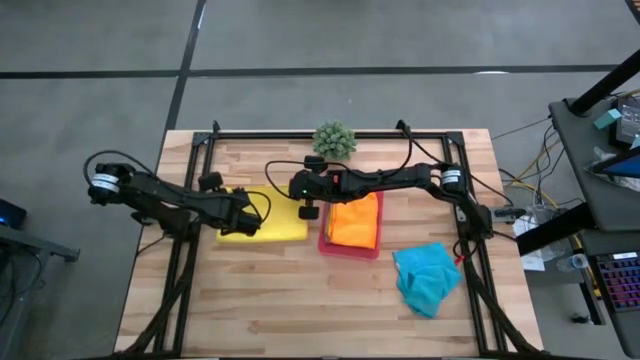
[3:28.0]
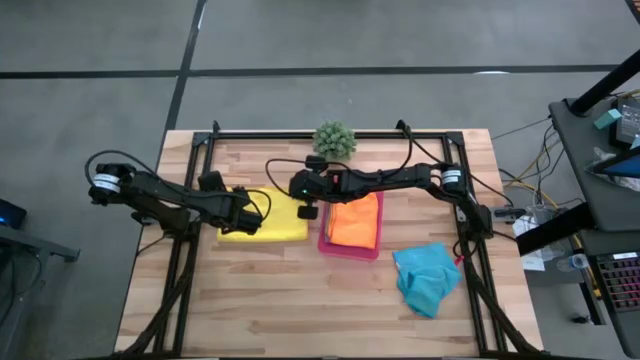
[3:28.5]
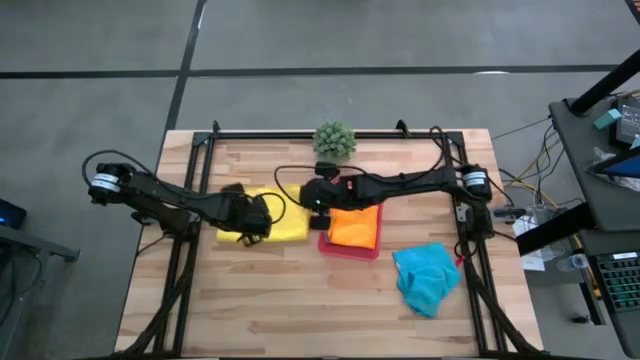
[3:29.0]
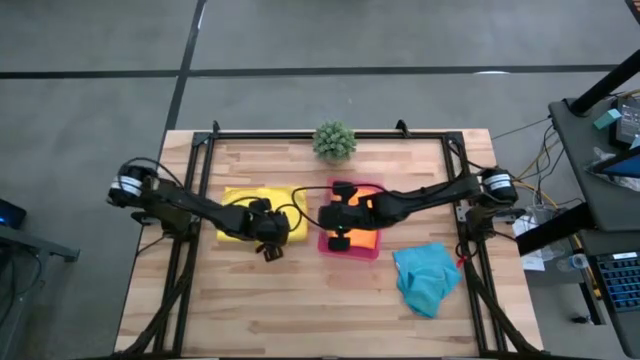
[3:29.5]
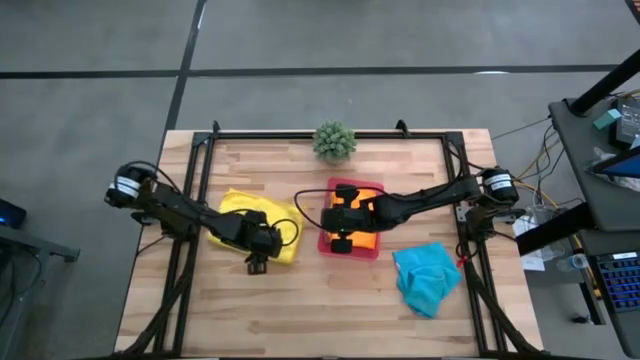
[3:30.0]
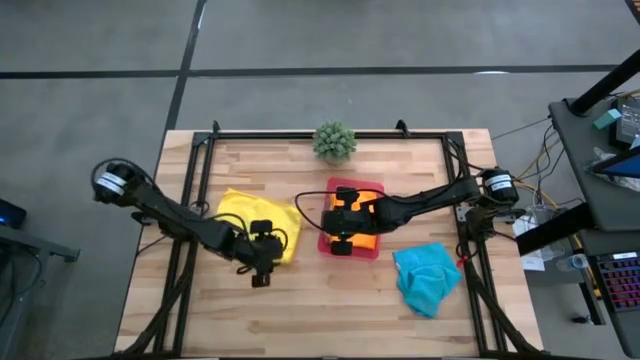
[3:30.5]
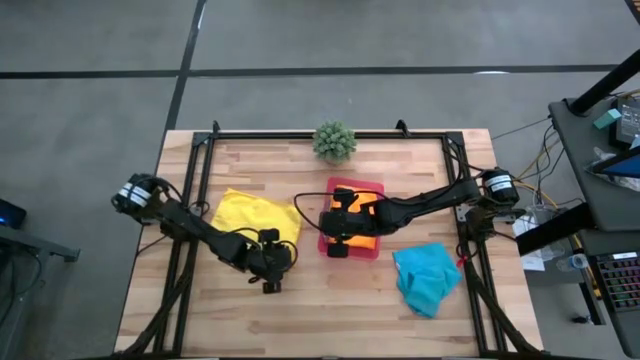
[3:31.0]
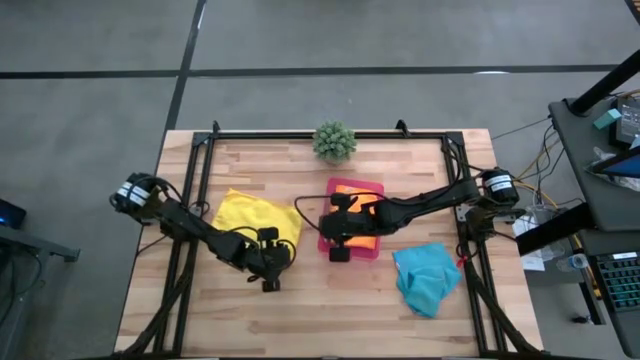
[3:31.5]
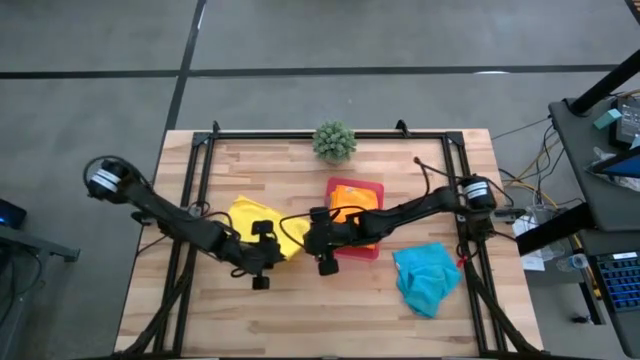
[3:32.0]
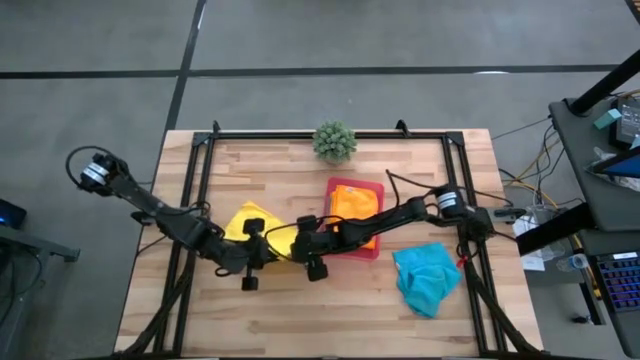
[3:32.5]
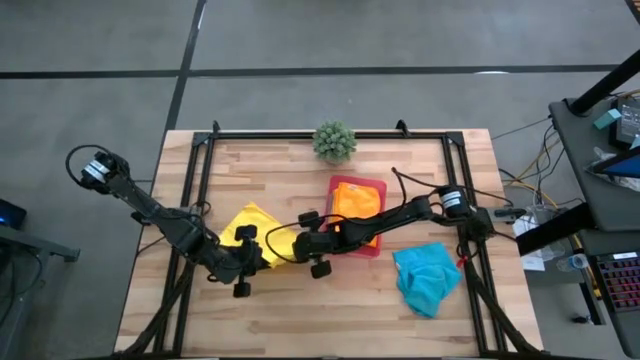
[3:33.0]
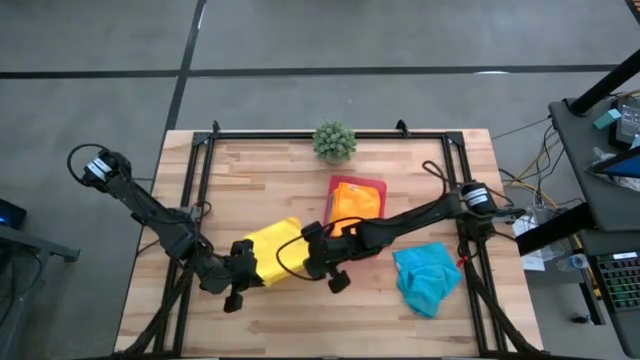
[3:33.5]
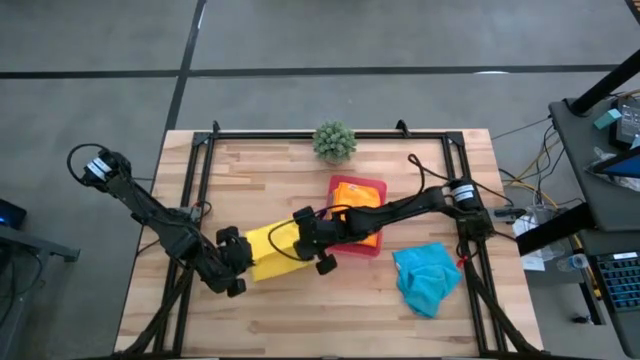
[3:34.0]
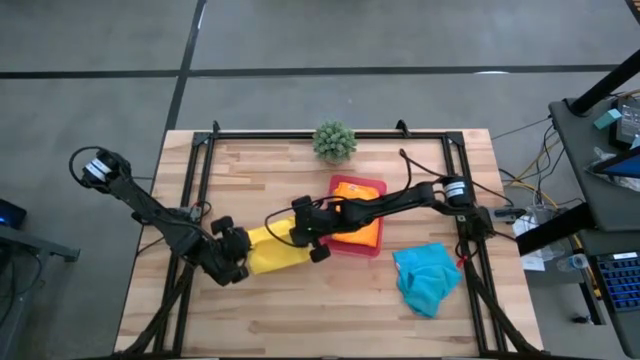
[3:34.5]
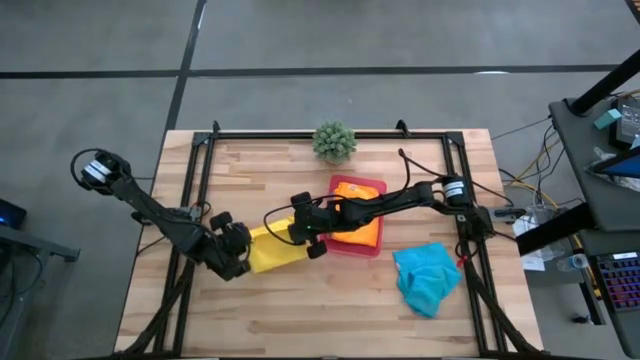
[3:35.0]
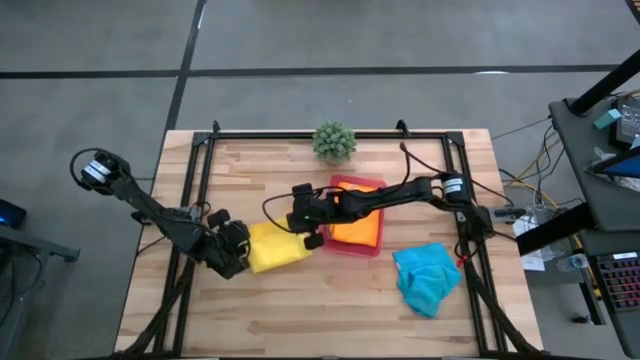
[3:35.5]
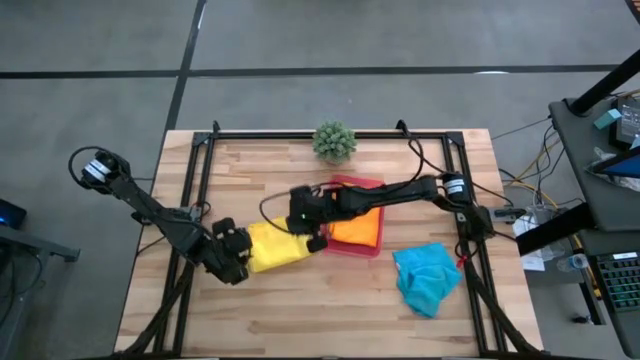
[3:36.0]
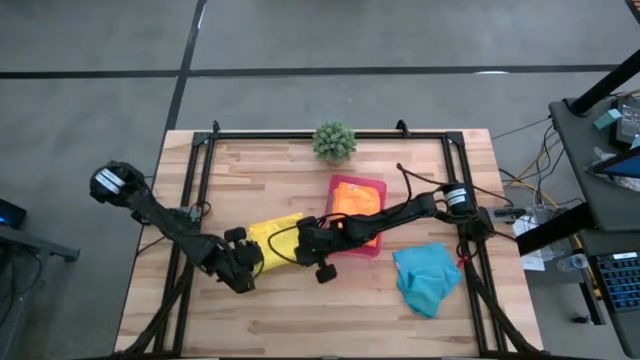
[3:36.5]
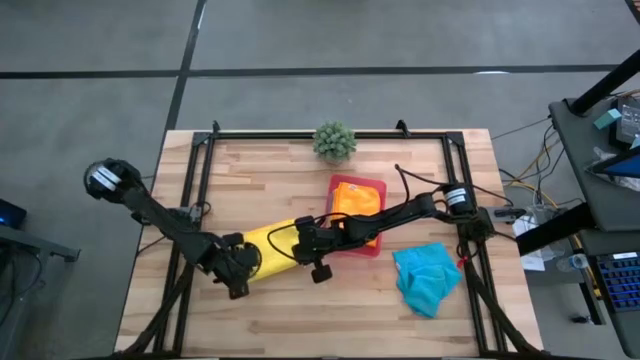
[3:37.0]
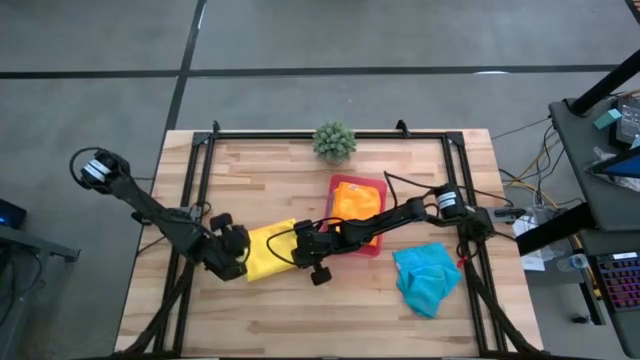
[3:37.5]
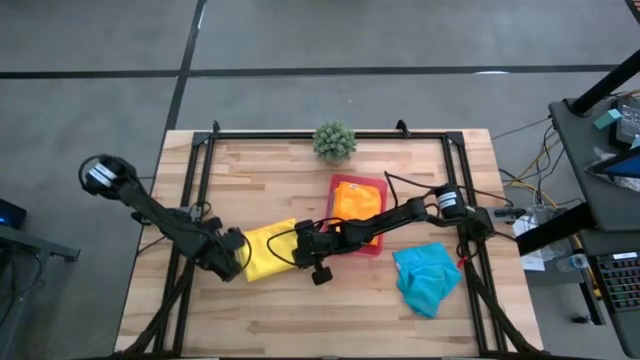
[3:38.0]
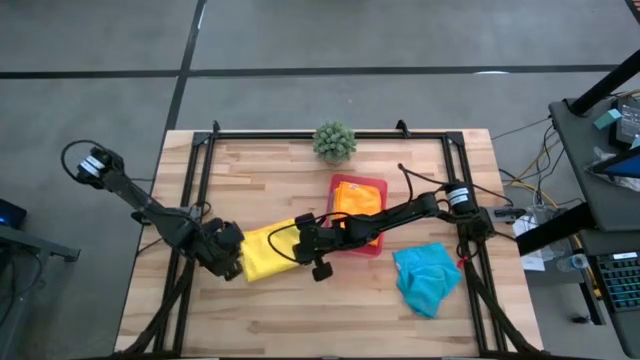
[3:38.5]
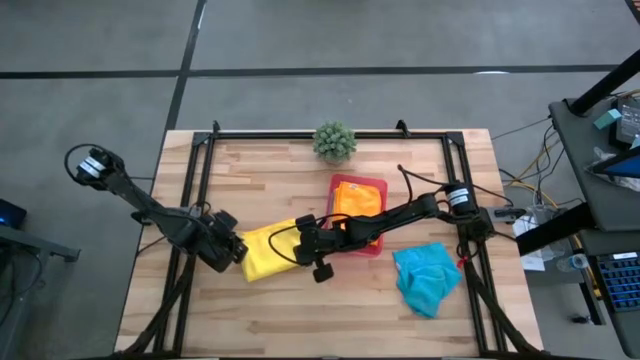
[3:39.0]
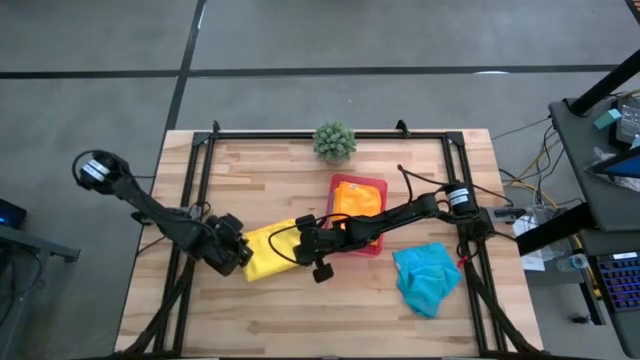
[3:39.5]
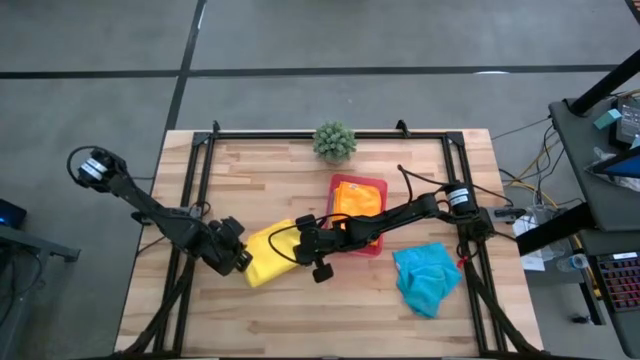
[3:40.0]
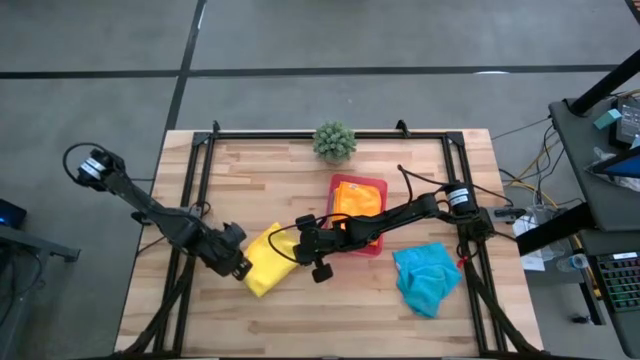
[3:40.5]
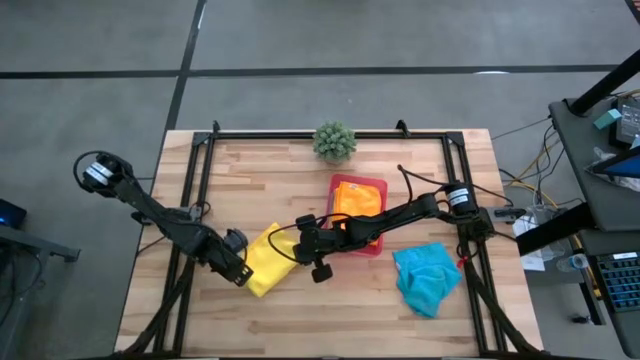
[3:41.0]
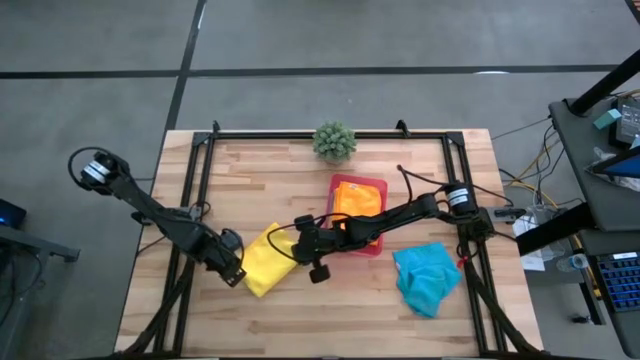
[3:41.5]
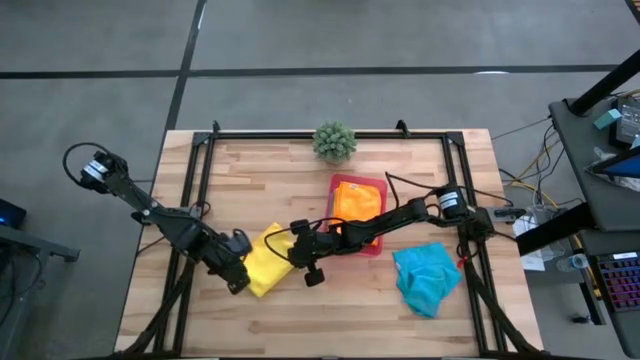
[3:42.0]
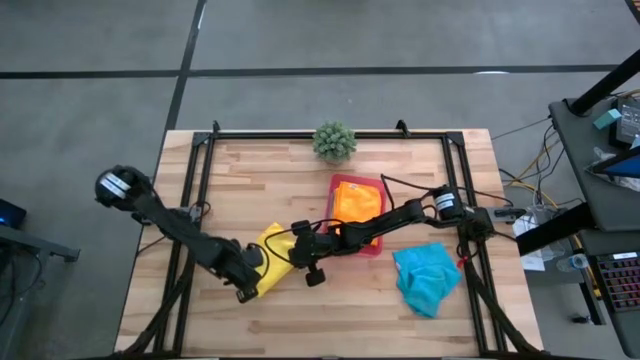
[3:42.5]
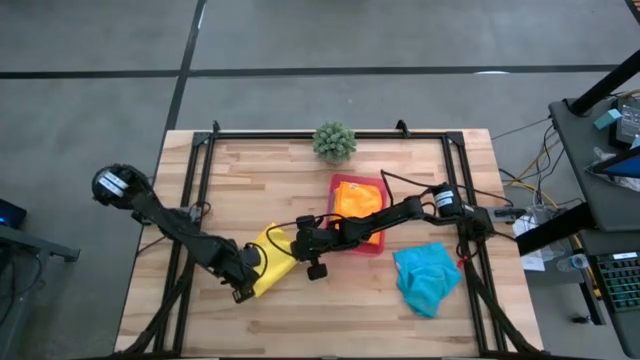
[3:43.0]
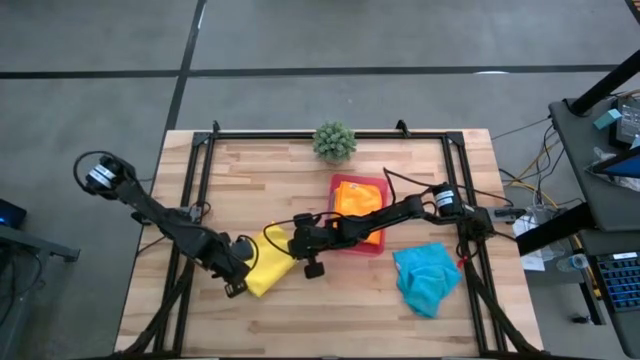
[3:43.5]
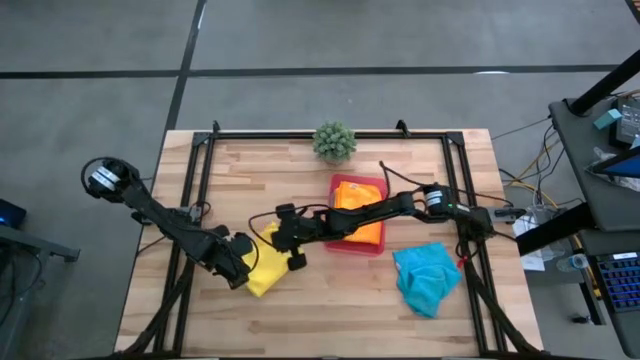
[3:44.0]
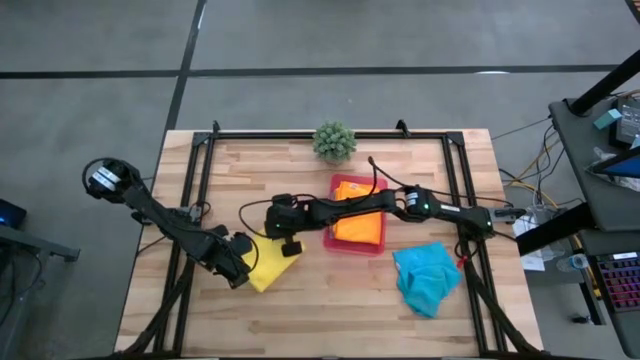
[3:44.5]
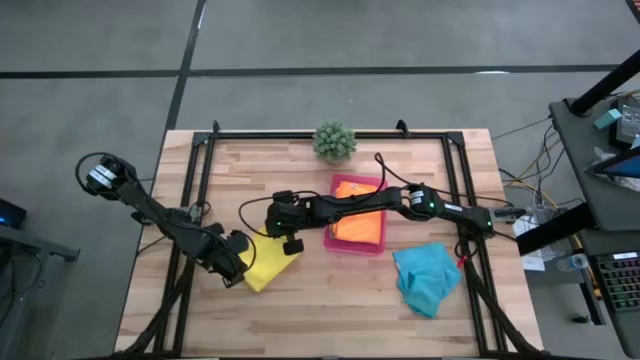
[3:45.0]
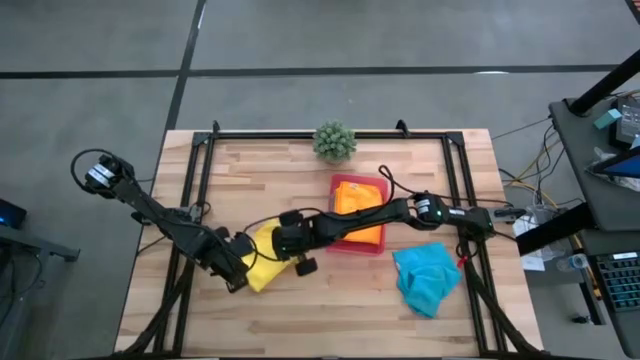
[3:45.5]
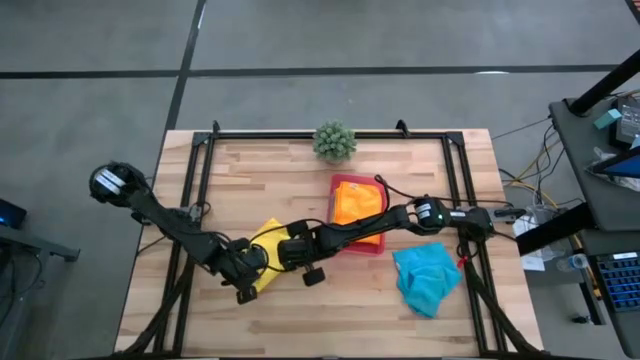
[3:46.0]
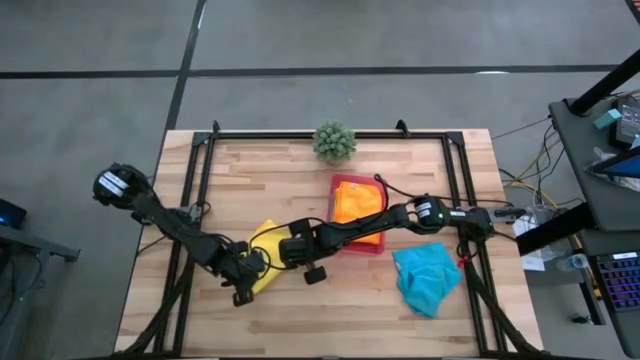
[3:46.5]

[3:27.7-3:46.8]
Task: Fold microfiber towels
Fold the yellow towel

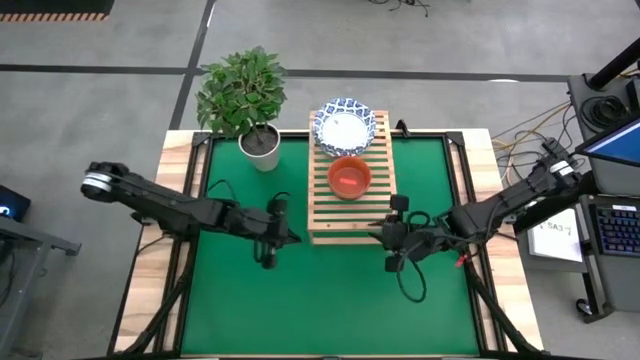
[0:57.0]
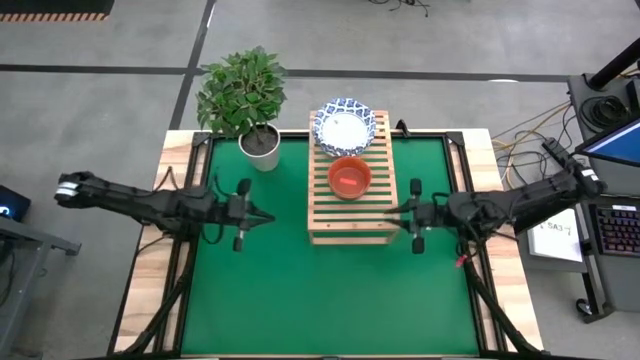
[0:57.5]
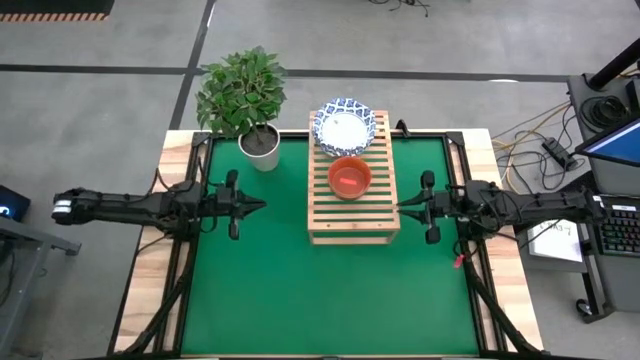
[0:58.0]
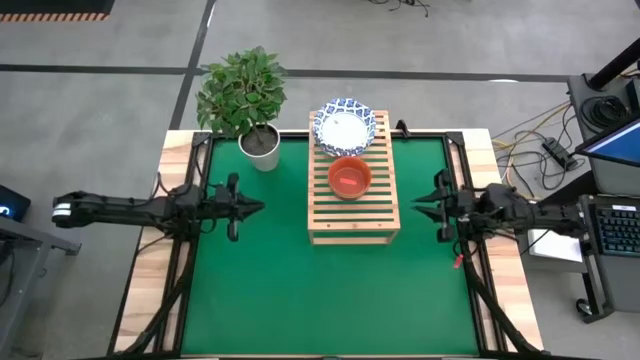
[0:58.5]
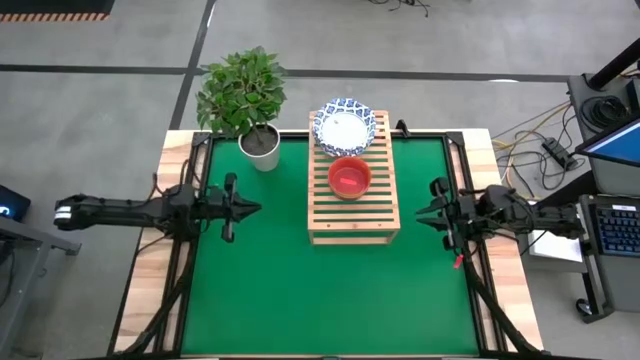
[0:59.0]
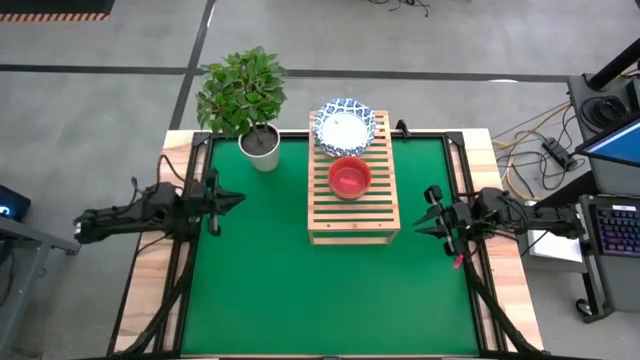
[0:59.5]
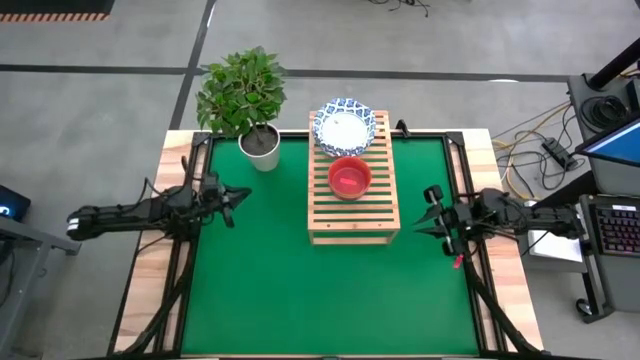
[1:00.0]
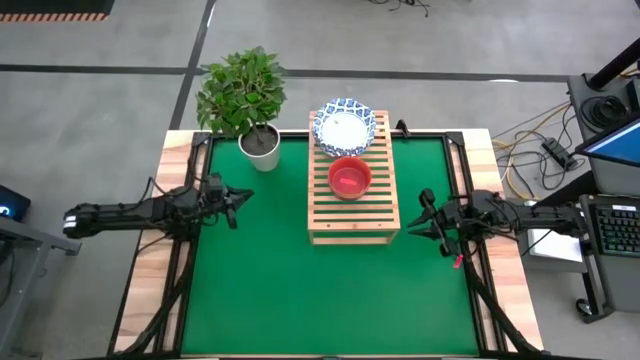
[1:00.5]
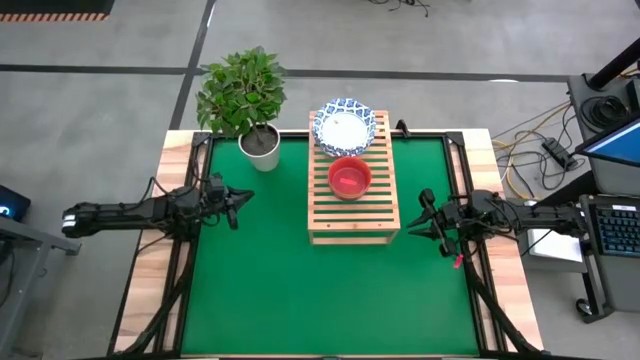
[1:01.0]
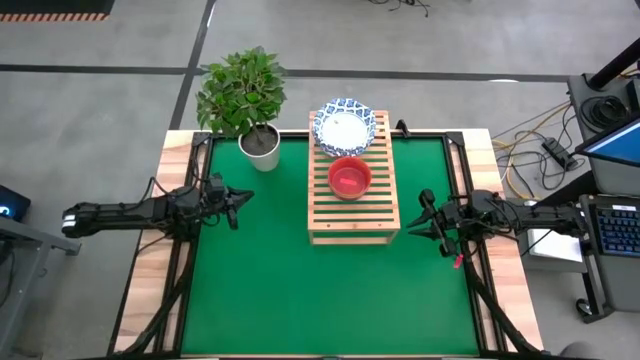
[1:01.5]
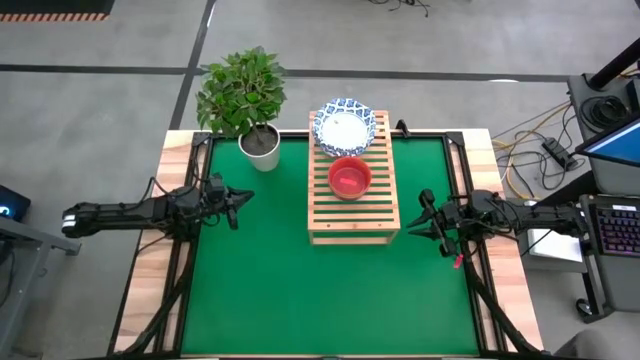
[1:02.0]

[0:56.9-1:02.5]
Task: Place and stack bowls onto a shelf
Return to Home Position
